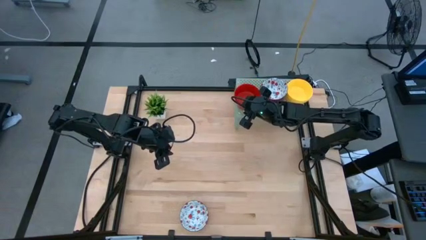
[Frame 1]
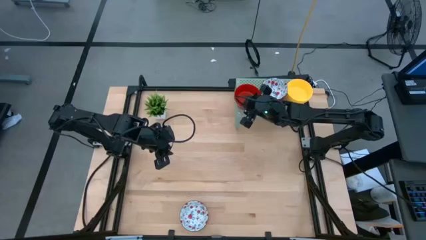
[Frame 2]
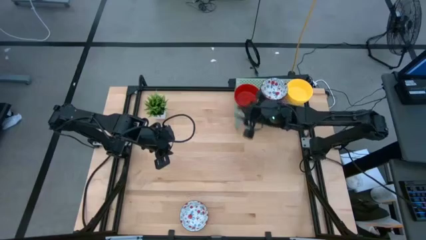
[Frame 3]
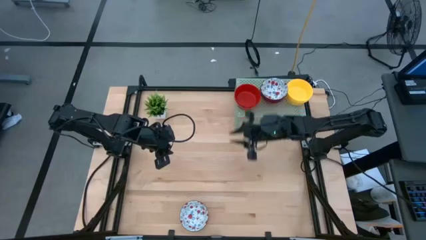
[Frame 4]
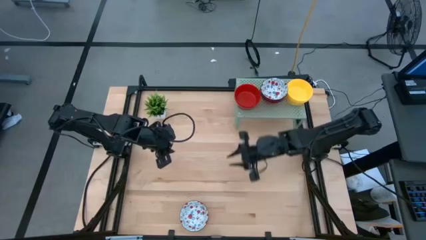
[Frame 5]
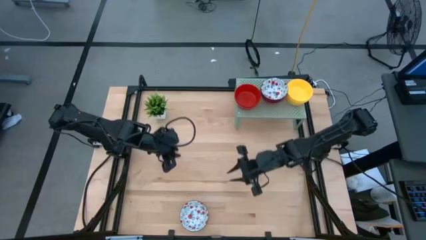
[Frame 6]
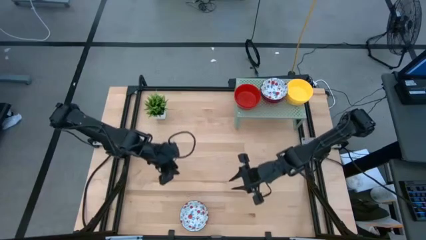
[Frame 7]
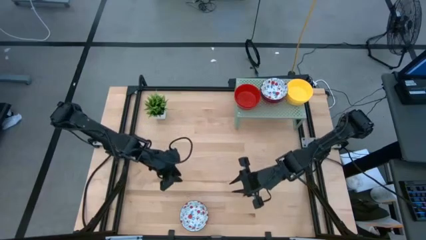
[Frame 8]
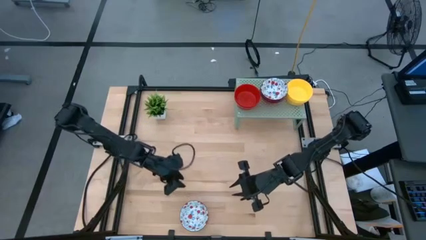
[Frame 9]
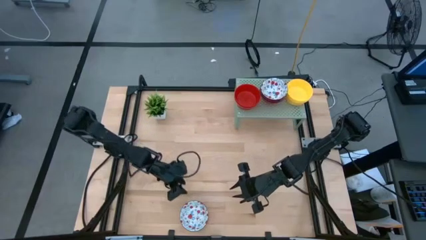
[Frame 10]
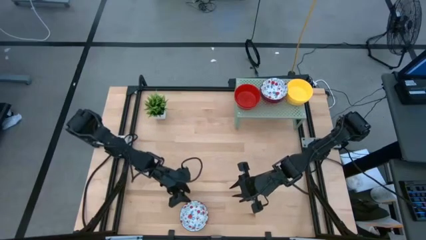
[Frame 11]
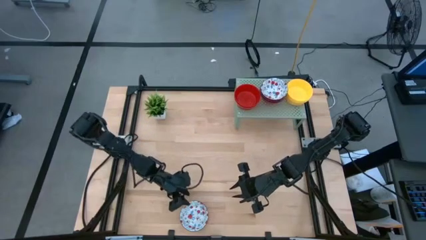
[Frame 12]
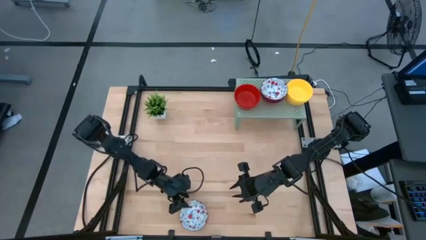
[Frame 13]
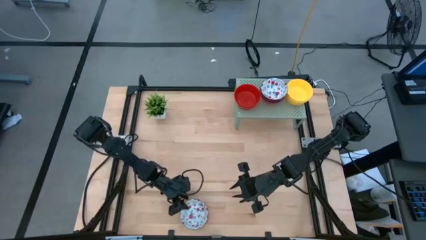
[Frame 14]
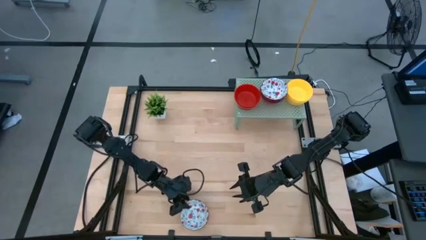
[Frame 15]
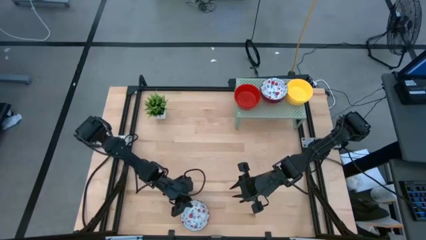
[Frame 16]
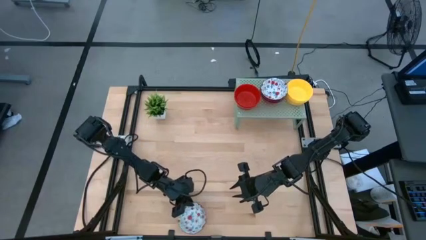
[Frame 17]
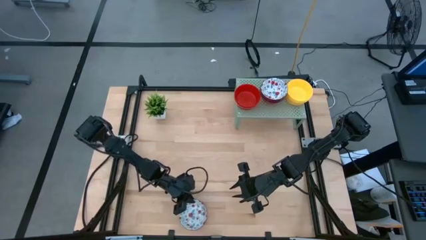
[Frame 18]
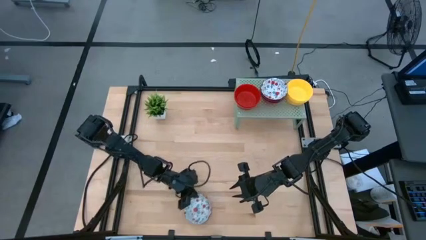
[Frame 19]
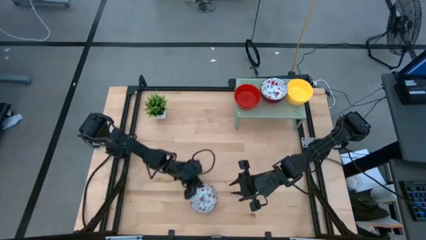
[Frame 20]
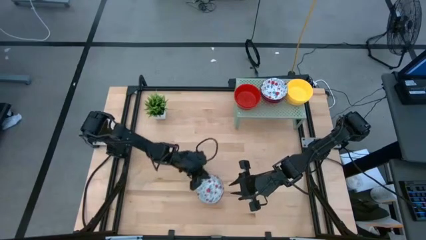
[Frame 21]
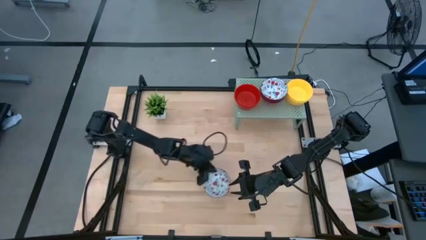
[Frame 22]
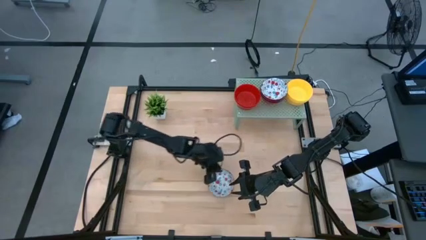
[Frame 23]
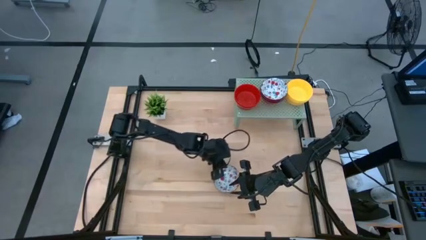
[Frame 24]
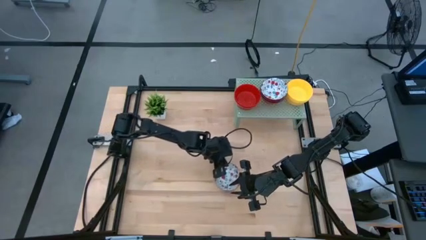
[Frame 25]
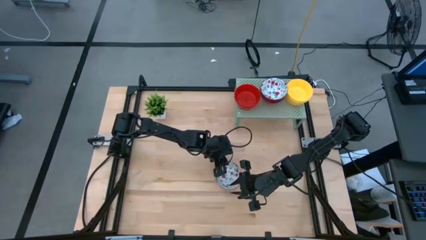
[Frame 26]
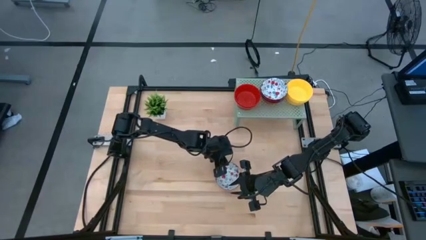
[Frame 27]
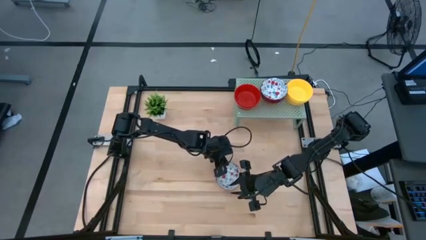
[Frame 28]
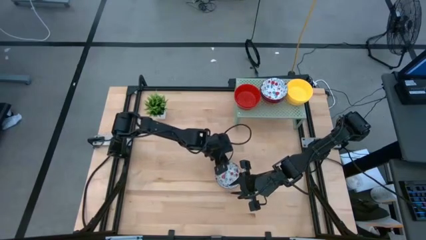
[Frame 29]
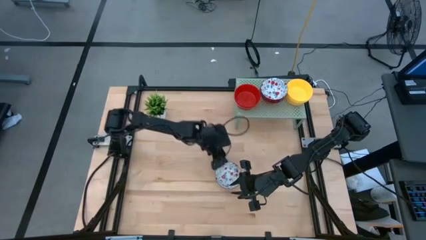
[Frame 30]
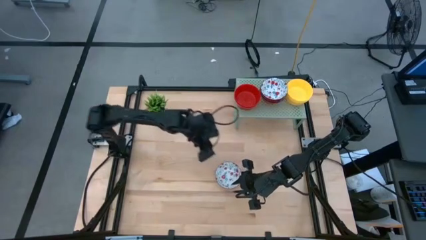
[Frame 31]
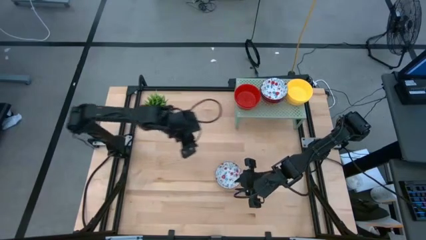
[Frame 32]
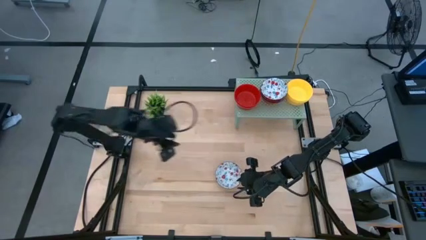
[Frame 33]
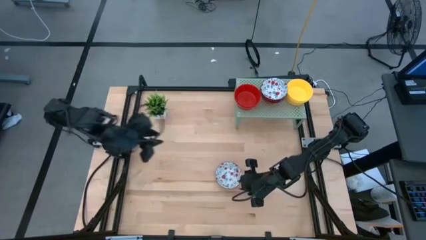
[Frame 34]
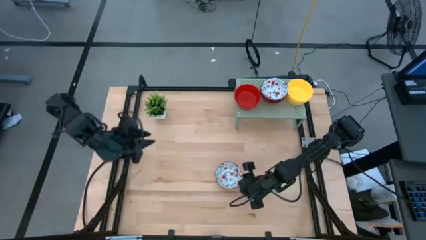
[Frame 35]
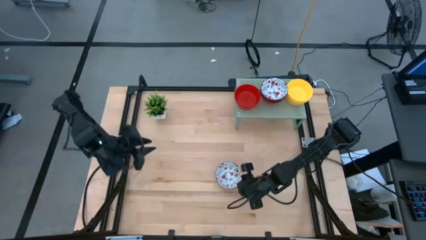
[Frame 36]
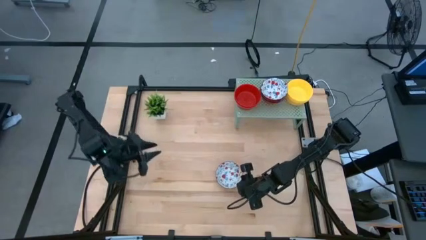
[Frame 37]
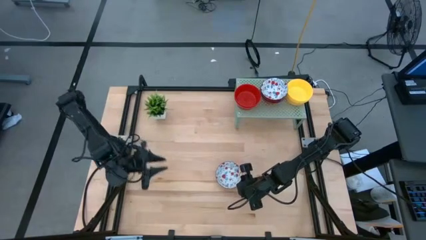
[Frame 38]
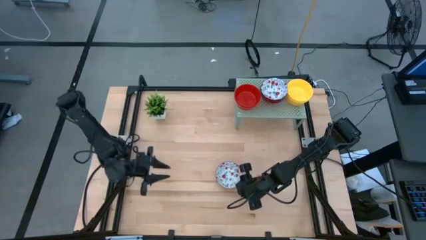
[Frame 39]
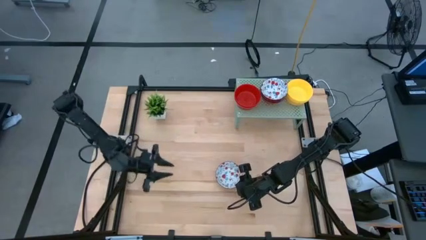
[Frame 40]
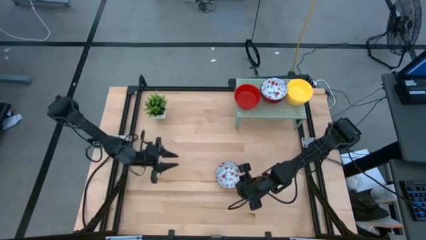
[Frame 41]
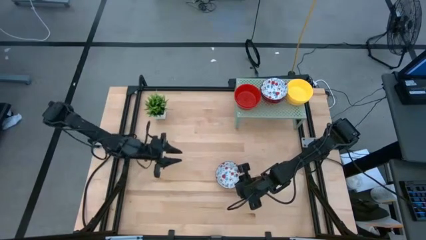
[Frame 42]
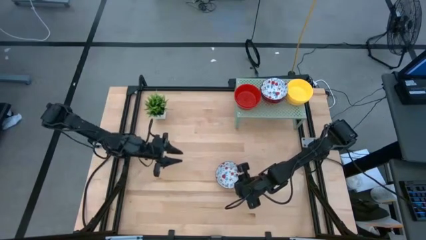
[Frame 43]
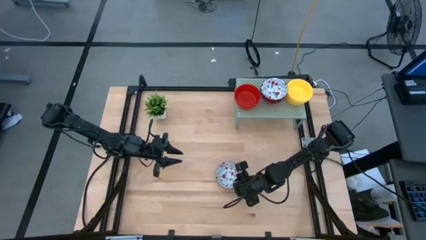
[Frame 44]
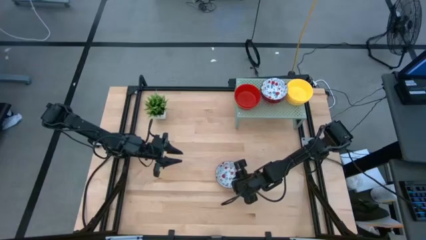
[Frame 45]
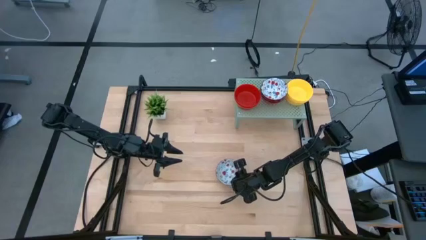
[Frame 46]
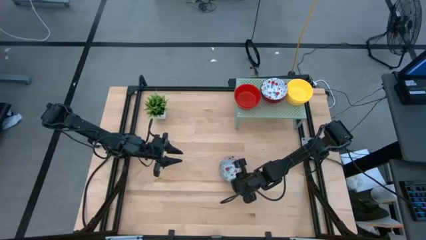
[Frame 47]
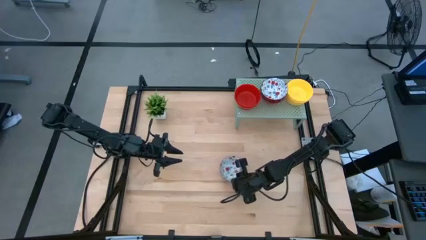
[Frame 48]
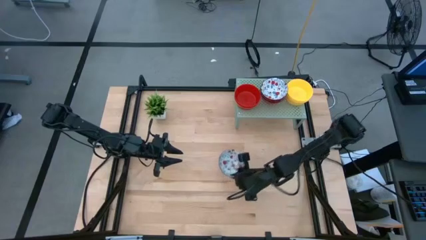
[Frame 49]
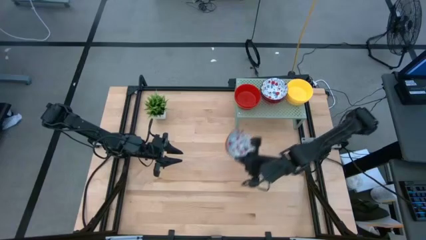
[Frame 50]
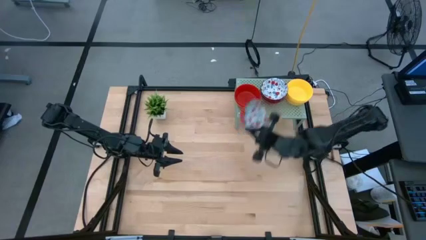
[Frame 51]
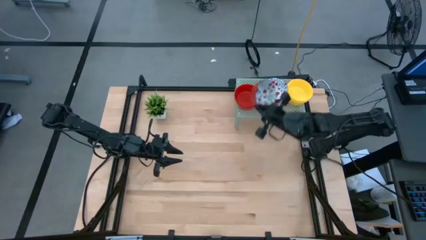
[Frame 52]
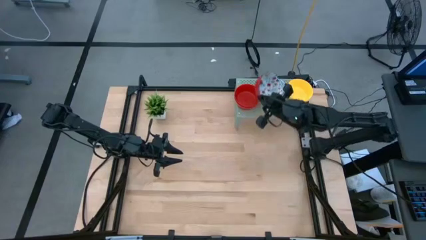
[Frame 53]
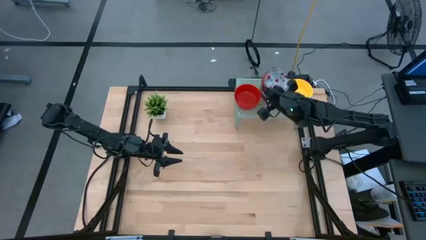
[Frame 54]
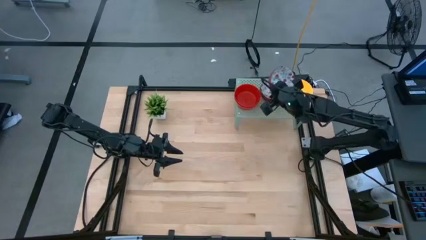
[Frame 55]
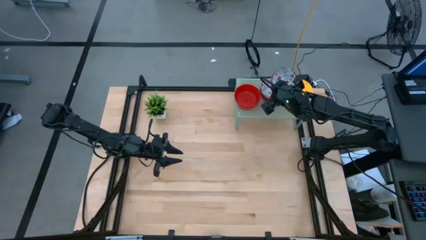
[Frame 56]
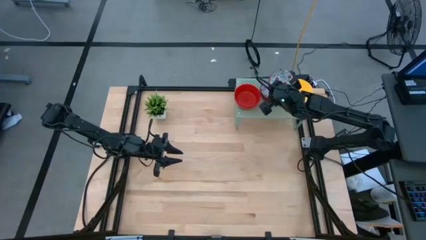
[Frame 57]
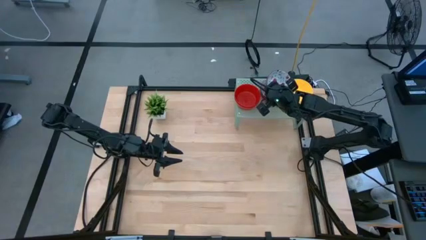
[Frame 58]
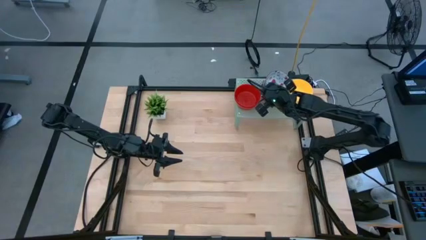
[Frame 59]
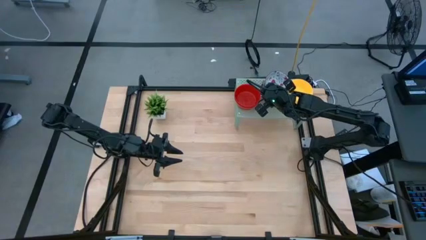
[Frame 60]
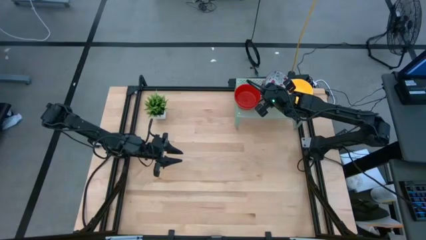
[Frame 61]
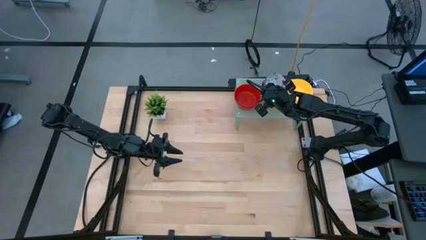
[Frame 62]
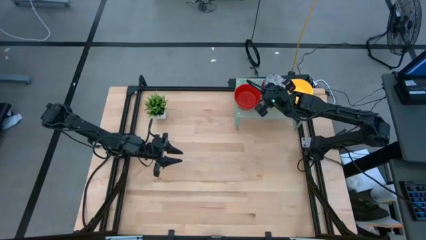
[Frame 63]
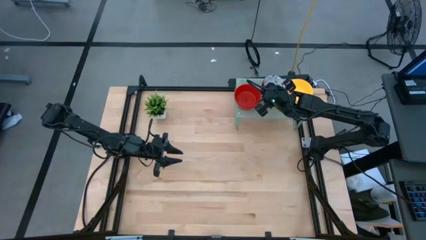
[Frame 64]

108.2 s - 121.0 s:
Task: Pick & Place Mini bowls
Stack the white pattern bowl on the stacked white pattern bowl on the shelf

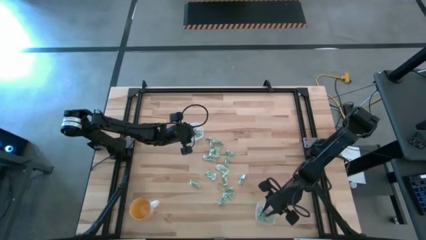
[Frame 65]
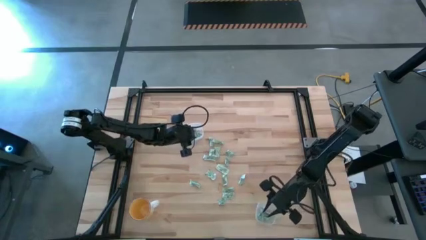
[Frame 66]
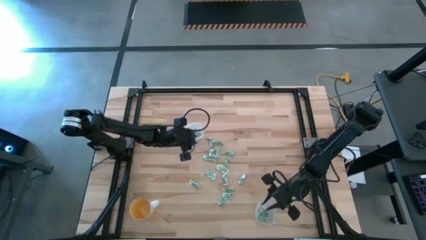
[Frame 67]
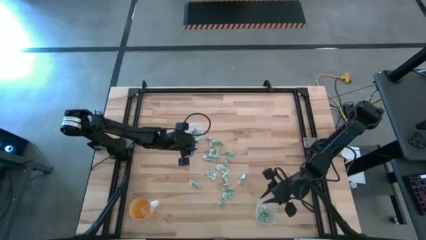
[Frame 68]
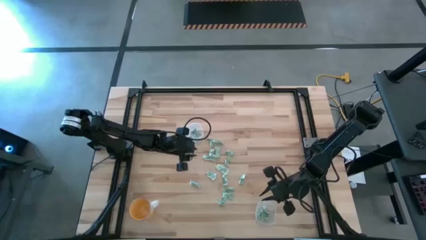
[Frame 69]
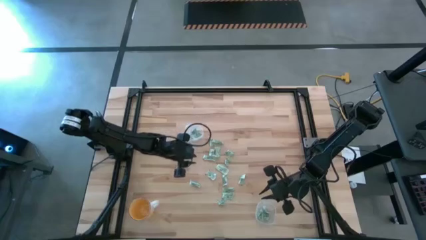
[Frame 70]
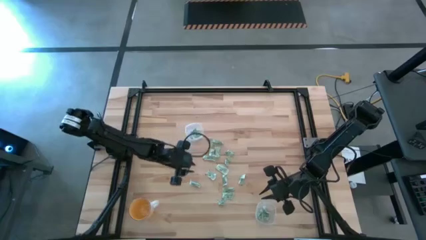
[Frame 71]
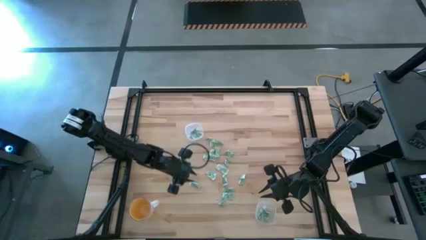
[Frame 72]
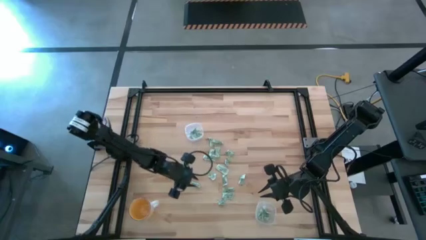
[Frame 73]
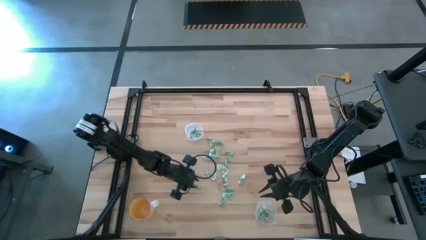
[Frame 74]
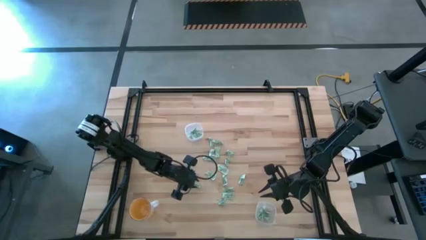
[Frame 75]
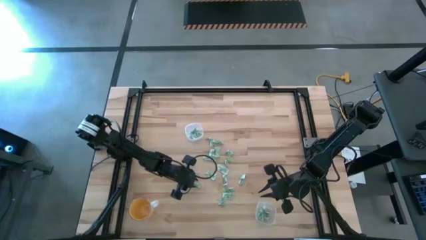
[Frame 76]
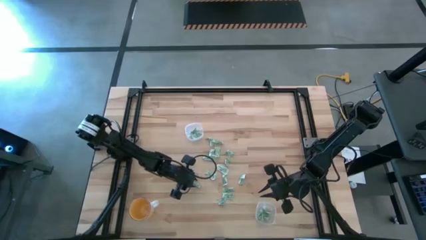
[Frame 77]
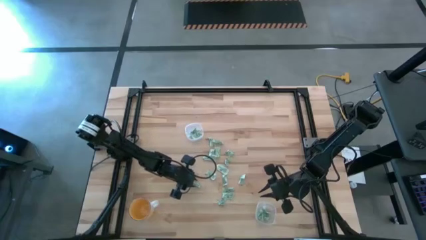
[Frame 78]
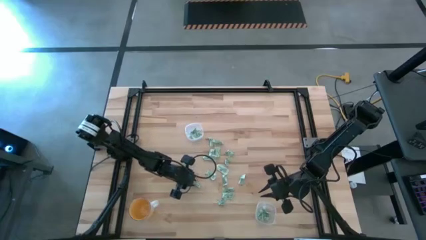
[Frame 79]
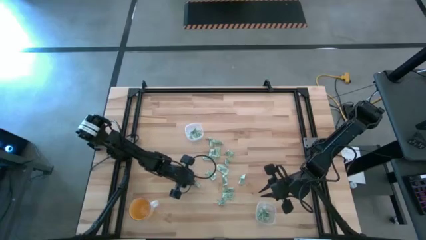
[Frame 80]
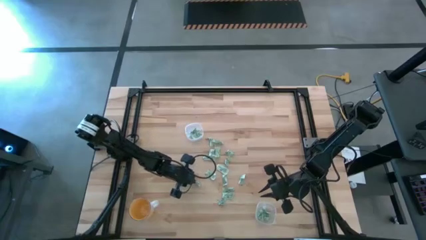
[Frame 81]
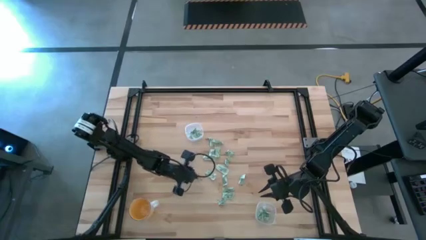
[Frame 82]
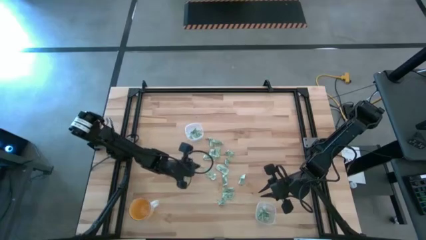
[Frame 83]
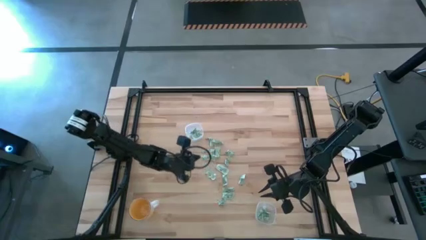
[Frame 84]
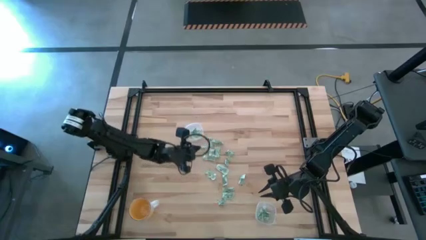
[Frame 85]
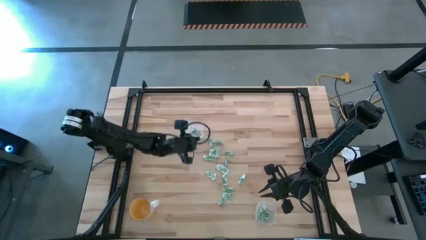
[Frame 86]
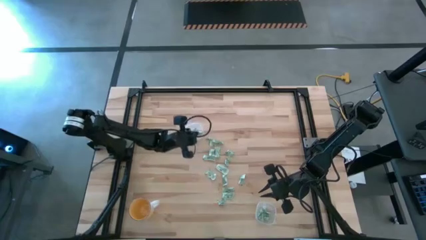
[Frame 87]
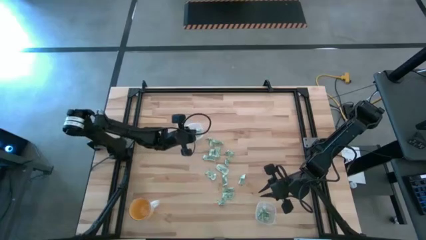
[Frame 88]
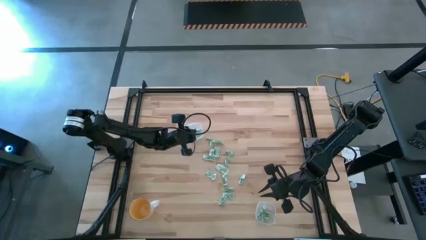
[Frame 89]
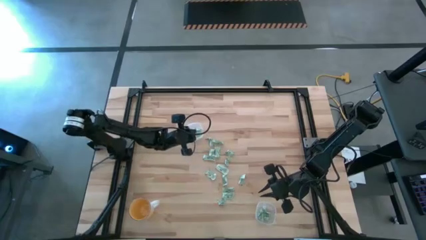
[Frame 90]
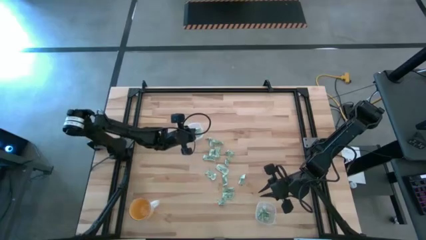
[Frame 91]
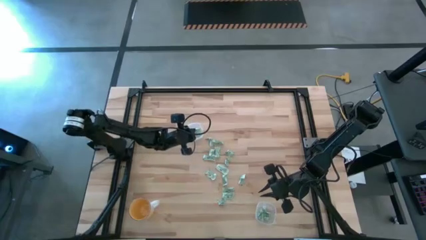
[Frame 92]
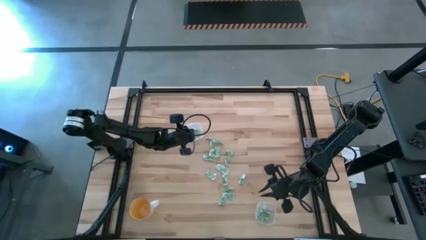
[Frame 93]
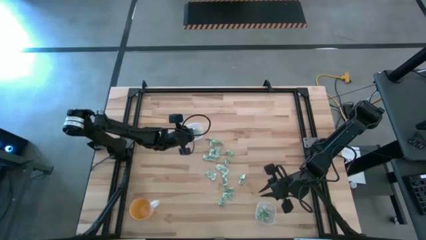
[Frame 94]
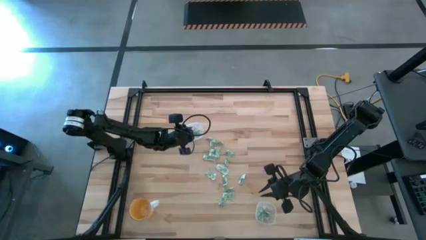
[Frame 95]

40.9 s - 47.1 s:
Task: Pick and place Stevia / Truvia into bins
Put the stevia packet into the top transparent container
